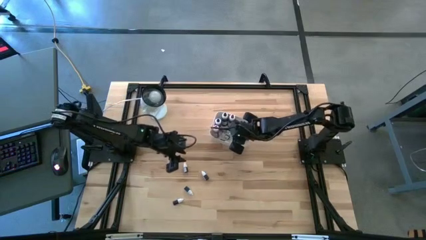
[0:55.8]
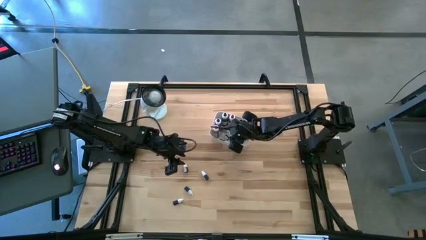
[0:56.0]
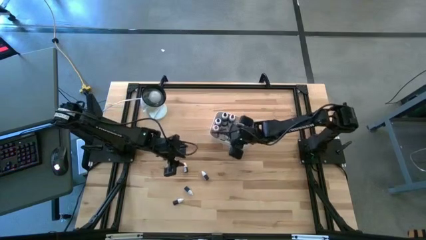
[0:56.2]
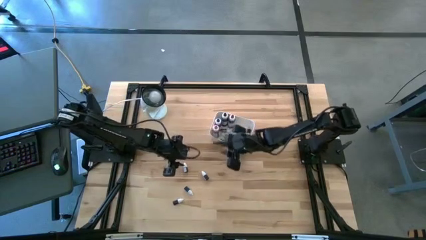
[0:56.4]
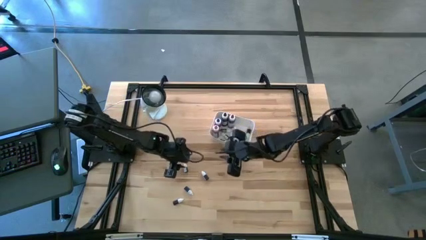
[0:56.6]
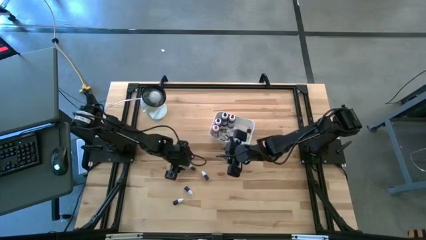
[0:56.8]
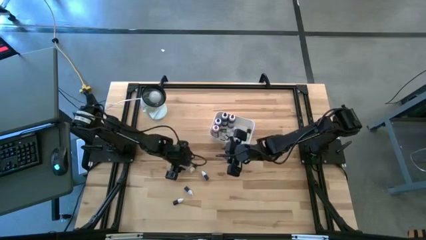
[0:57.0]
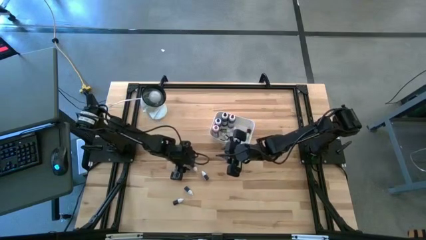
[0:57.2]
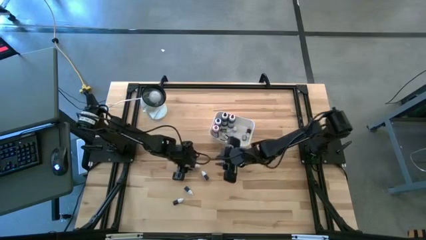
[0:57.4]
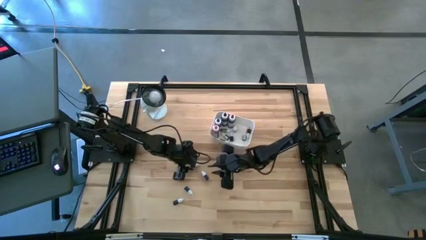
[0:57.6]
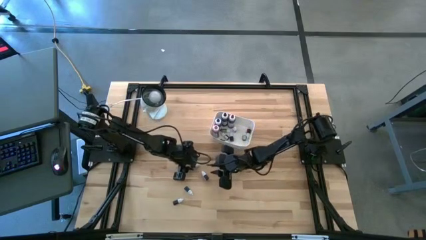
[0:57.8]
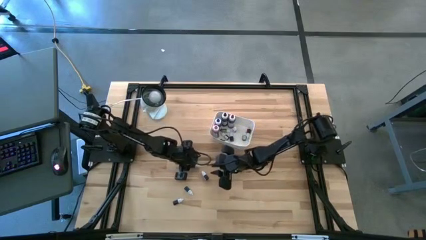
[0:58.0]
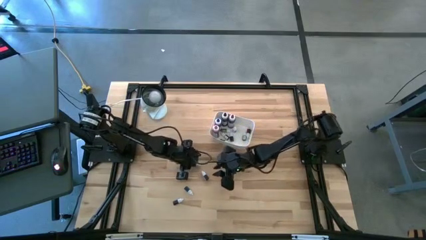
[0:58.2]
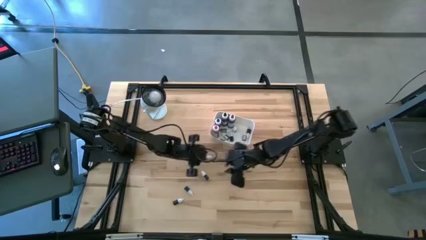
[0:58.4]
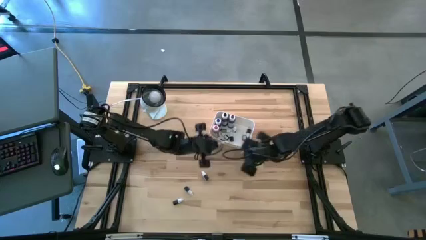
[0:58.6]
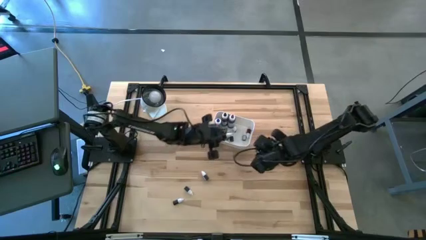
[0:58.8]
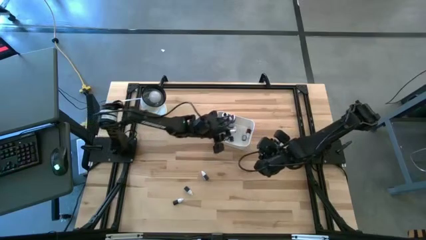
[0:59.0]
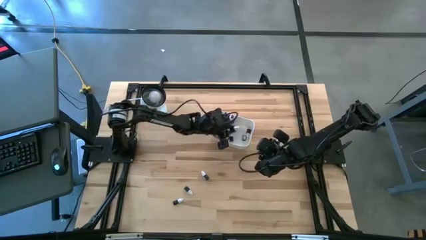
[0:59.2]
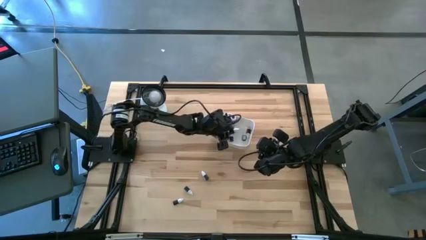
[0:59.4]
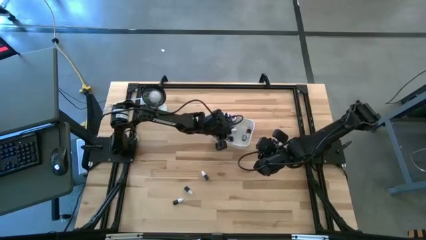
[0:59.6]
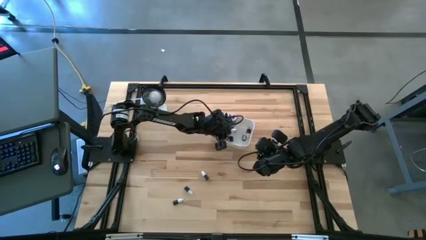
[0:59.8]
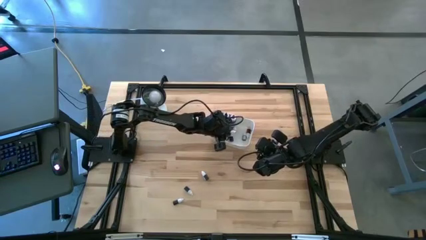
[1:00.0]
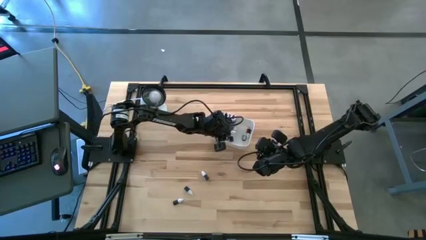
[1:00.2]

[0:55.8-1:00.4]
Task: Pick & Place food coloring
Put the violet small food coloring bottle into the white bin

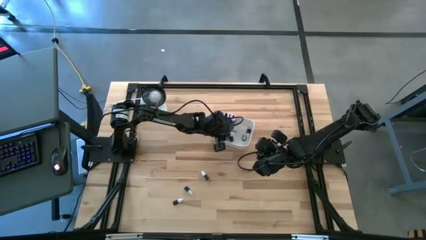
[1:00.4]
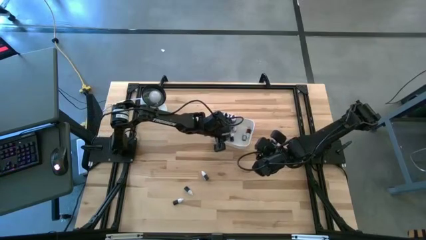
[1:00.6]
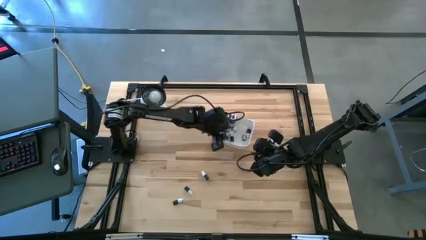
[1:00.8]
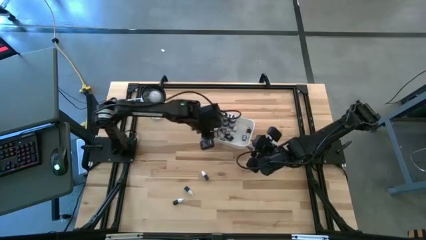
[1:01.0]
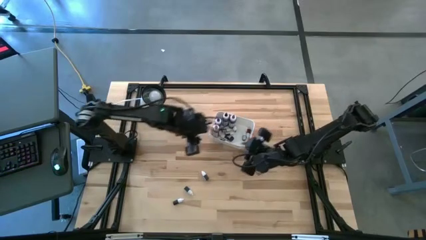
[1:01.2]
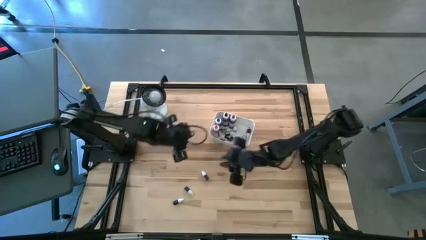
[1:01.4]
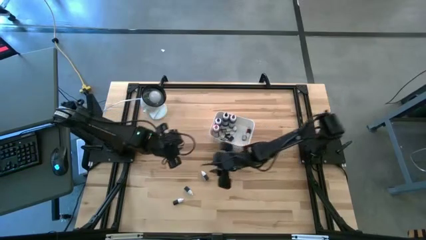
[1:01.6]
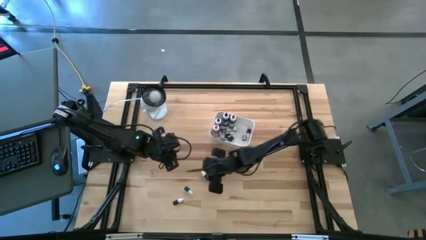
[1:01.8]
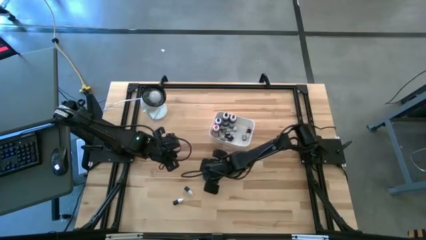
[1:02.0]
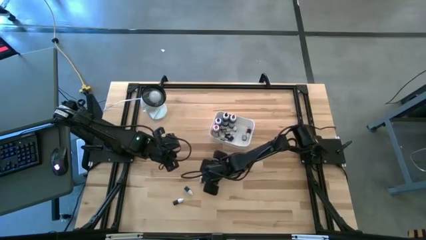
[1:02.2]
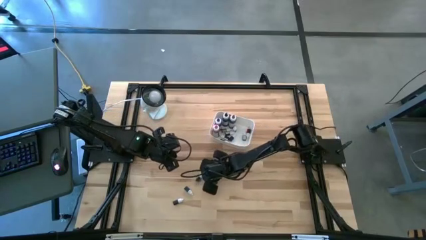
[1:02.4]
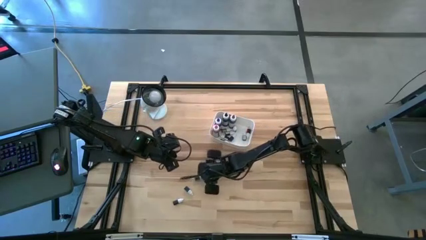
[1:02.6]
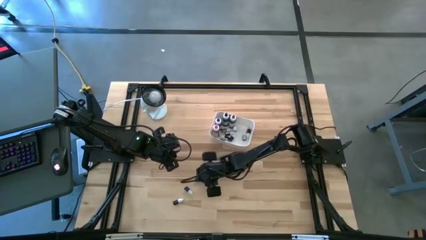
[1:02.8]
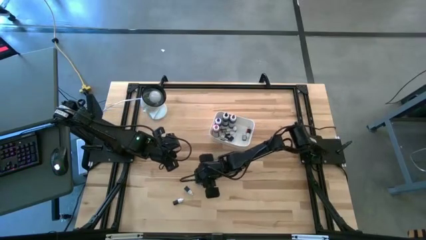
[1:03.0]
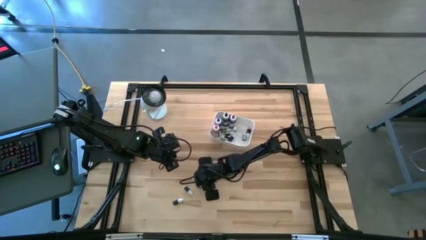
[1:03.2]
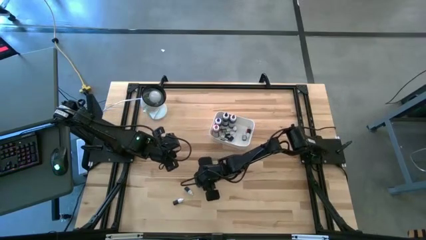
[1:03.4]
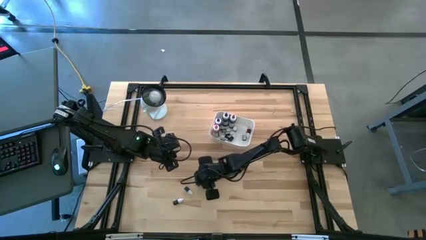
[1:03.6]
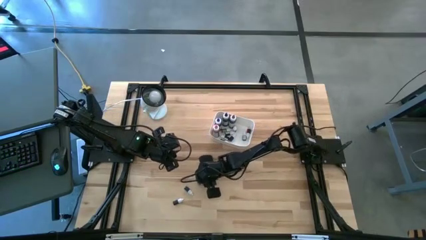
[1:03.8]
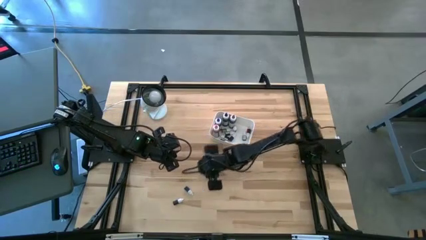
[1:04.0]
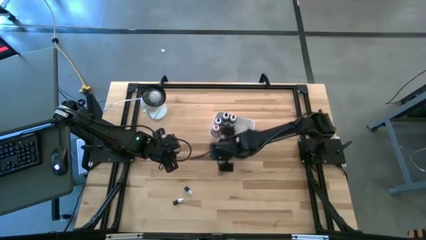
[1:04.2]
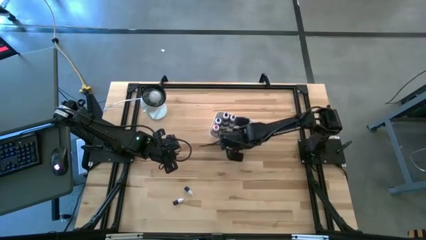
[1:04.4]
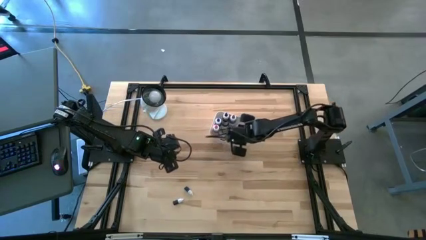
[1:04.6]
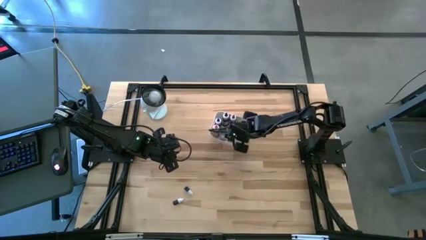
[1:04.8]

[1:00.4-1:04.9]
Put the black small food coloring bottle into the white bin

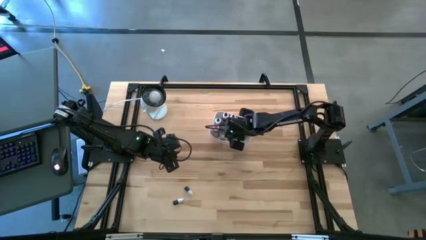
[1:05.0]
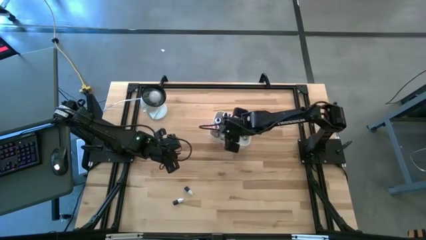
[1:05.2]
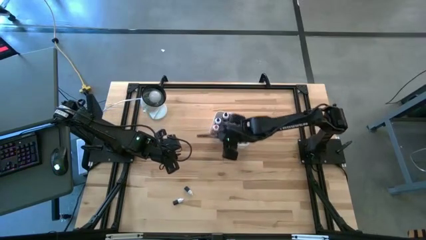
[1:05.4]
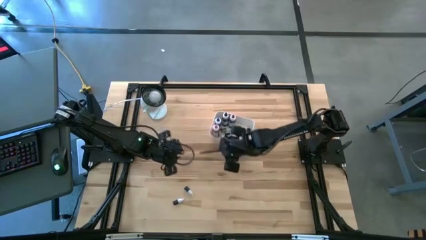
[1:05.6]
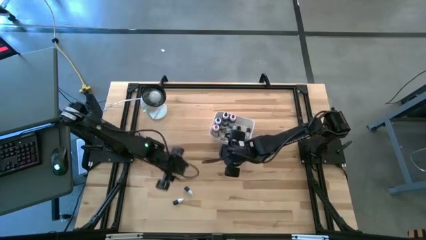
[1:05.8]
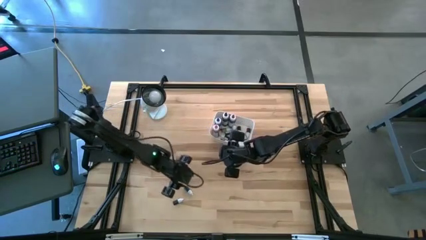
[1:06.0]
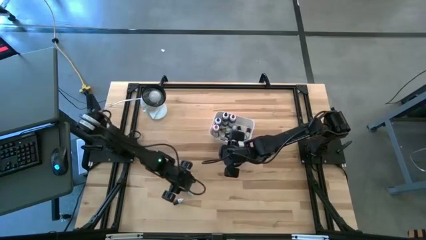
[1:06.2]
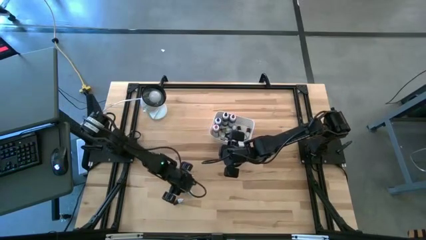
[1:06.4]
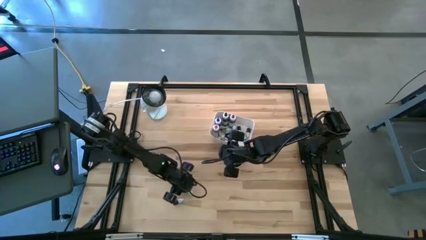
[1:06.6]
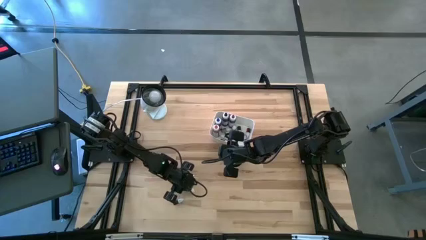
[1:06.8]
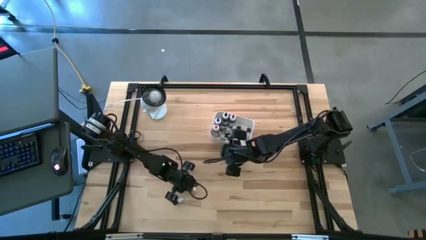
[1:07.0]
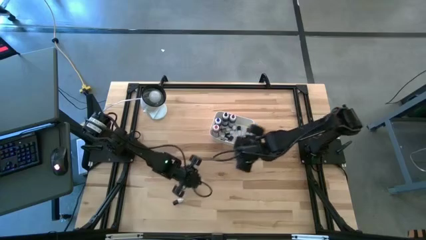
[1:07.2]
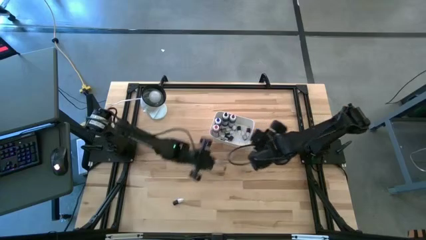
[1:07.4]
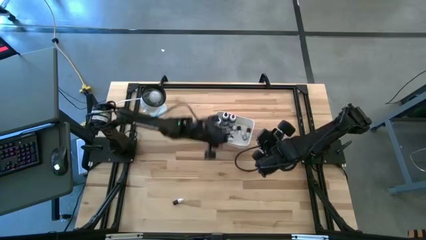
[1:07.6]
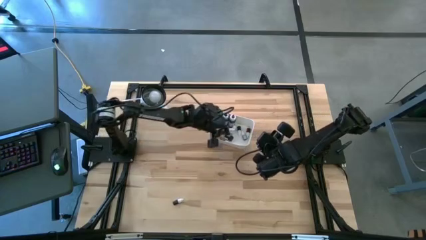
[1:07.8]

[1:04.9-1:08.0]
Put the white small food coloring bottle into the white bin

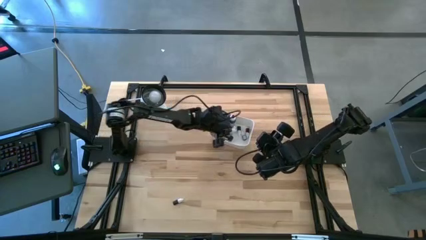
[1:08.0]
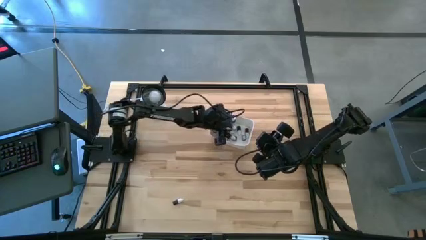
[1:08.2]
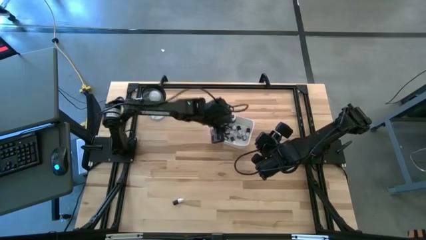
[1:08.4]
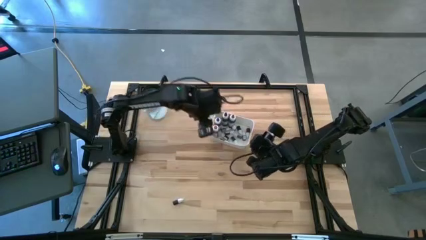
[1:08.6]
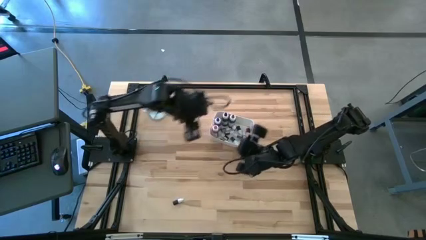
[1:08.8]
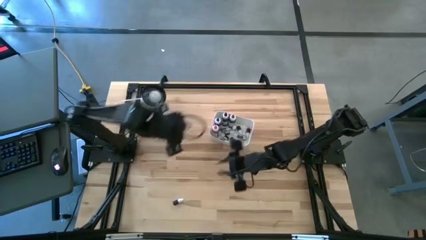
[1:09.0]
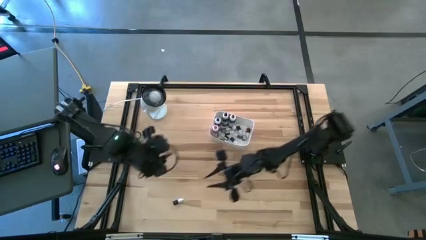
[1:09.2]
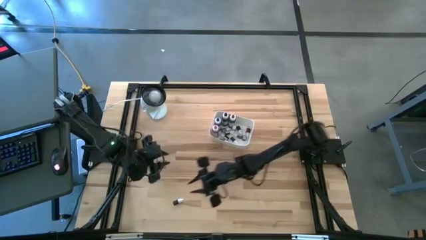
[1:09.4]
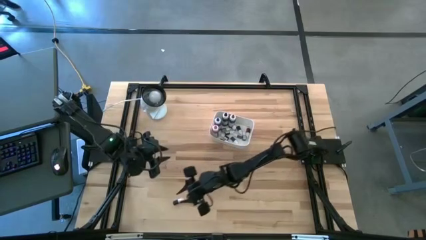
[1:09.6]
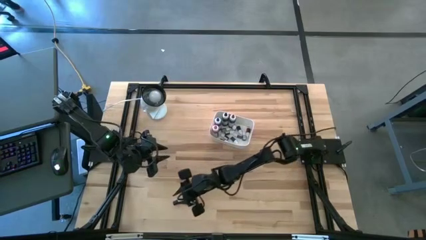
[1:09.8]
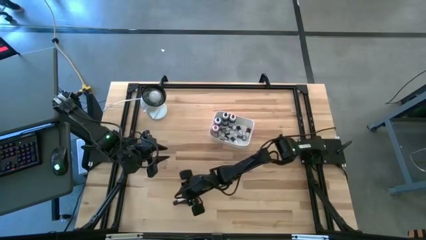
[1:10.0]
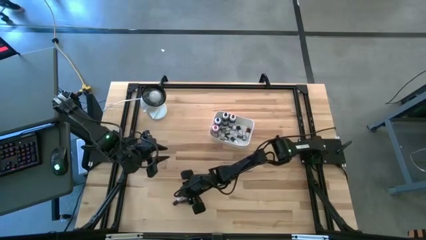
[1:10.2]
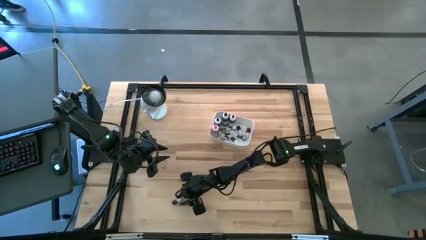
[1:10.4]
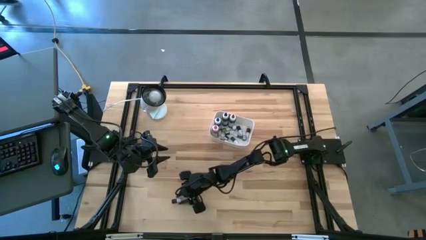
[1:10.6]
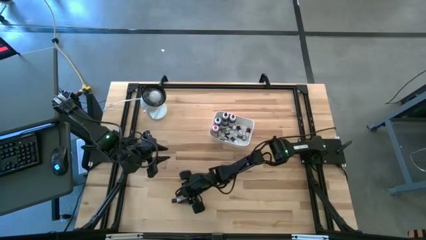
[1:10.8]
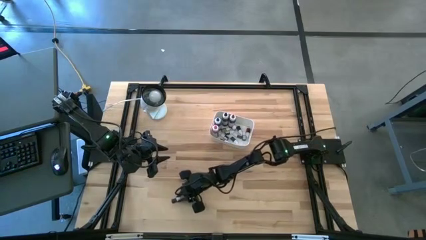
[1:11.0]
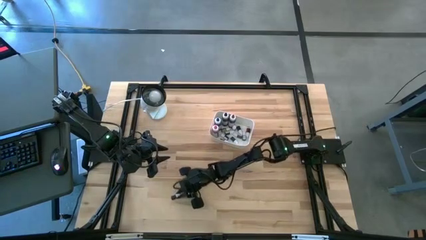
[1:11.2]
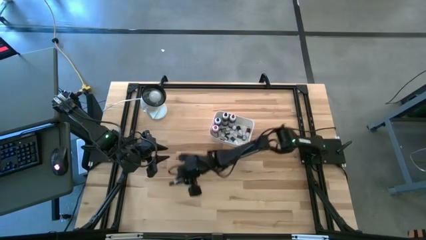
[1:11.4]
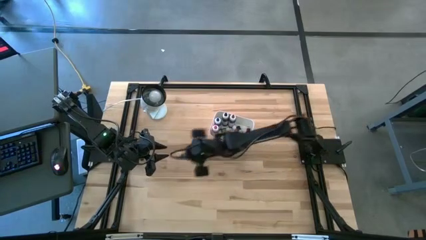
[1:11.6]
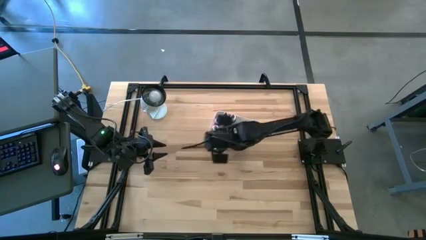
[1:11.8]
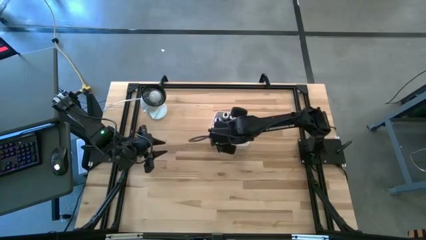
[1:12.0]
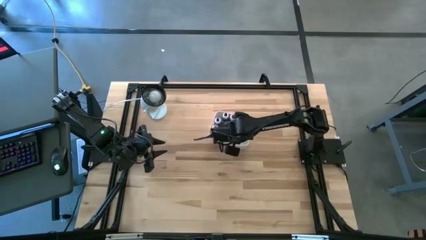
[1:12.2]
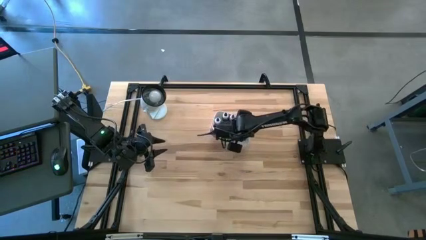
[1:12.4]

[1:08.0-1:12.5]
Put the red small food coloring bottle into the white bin
